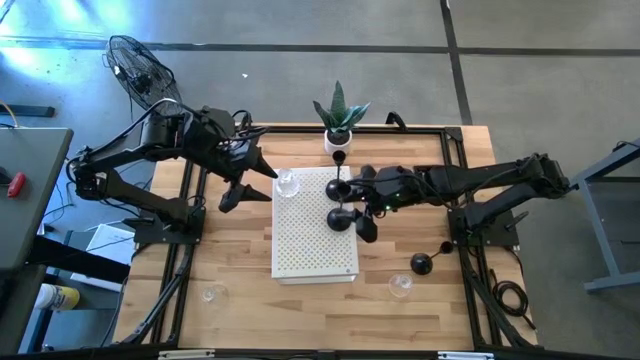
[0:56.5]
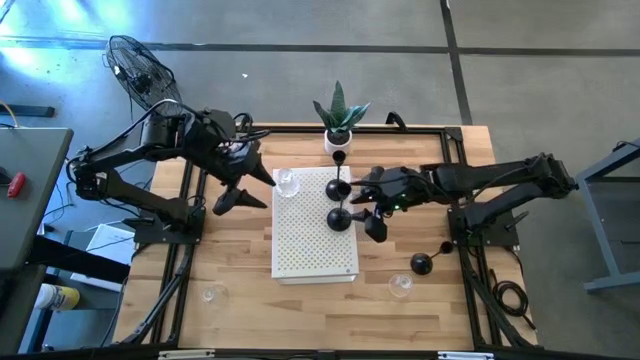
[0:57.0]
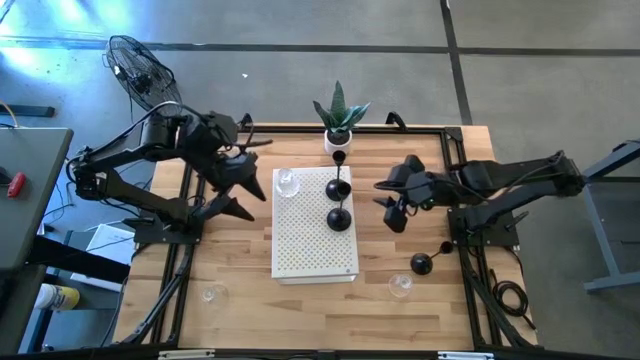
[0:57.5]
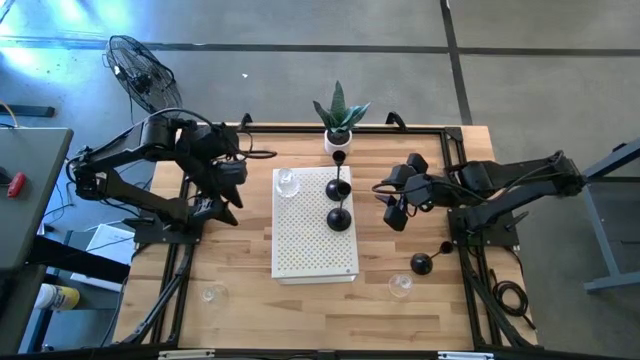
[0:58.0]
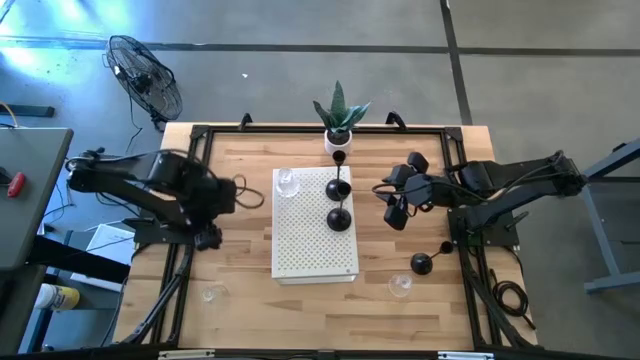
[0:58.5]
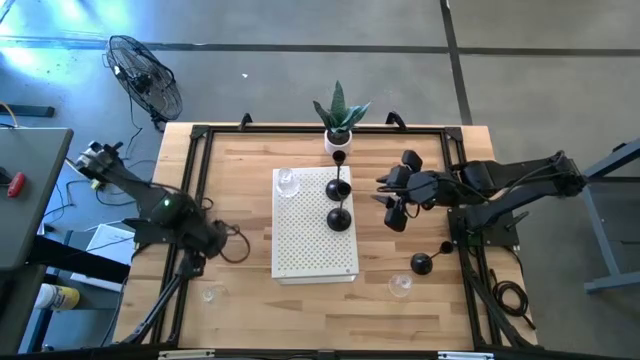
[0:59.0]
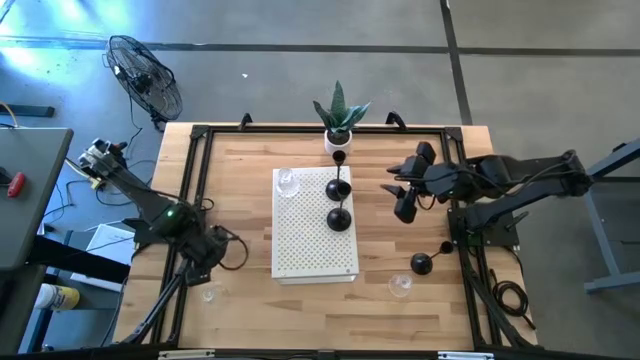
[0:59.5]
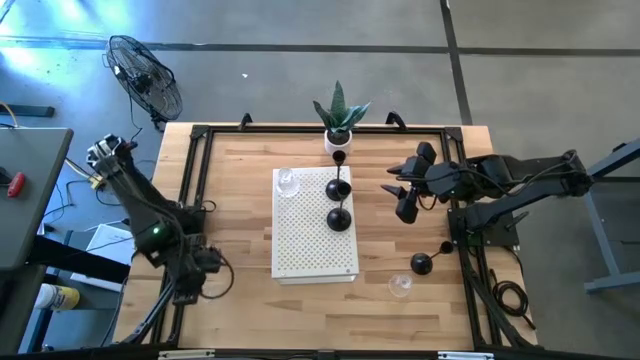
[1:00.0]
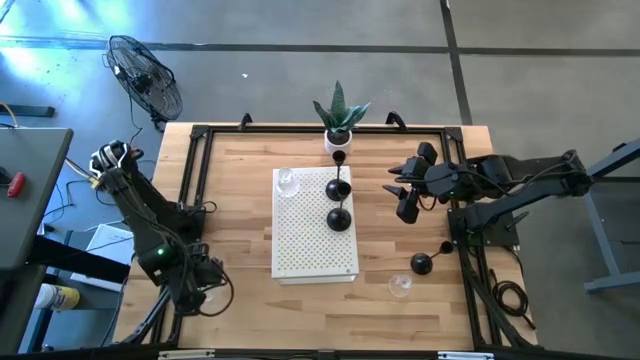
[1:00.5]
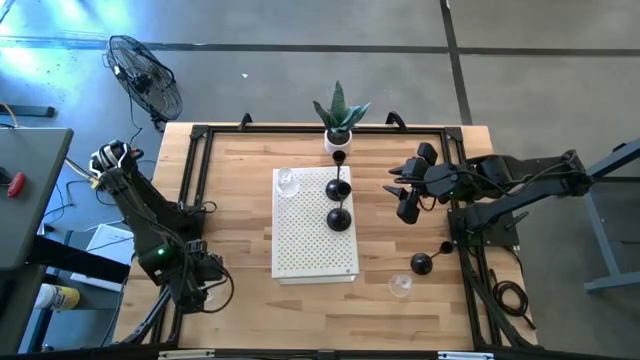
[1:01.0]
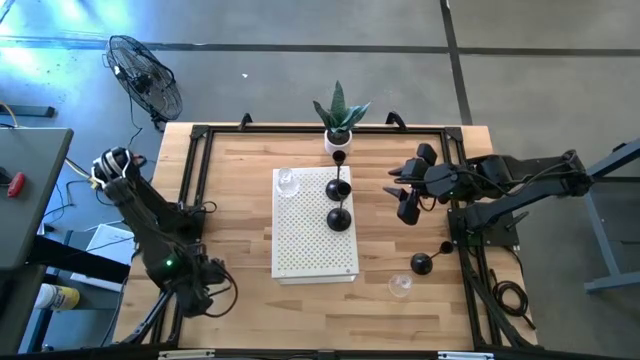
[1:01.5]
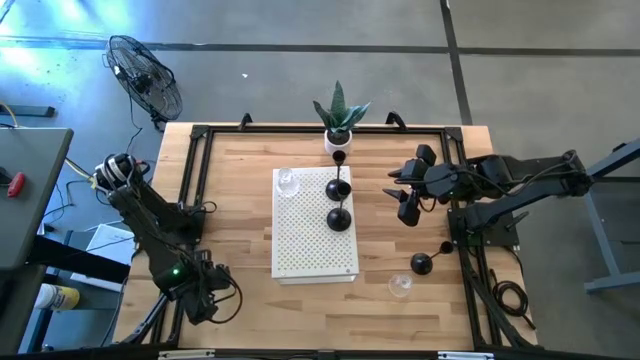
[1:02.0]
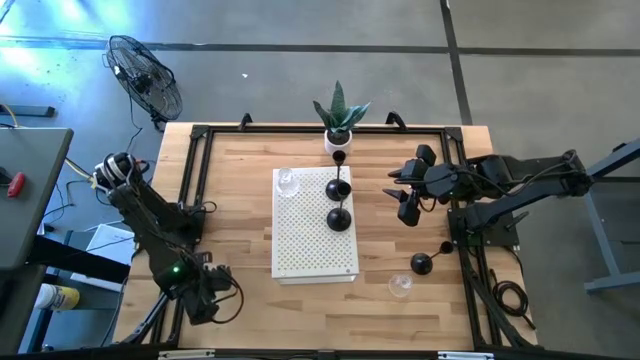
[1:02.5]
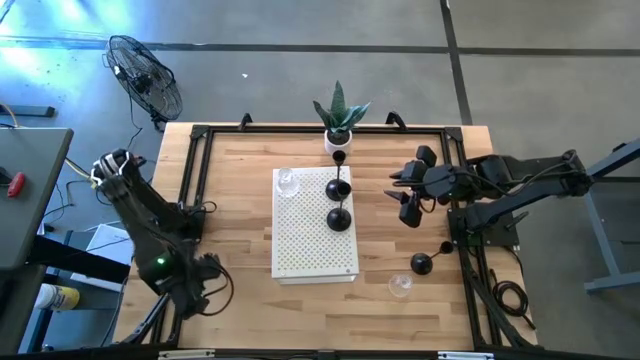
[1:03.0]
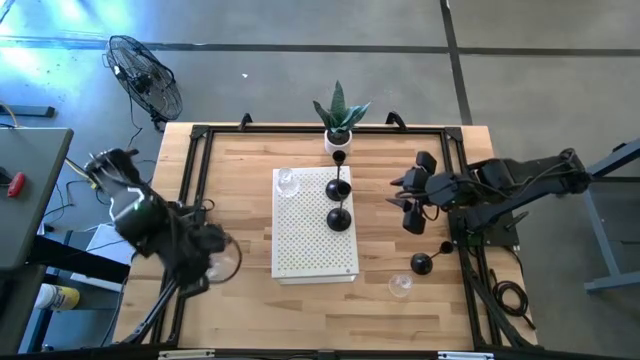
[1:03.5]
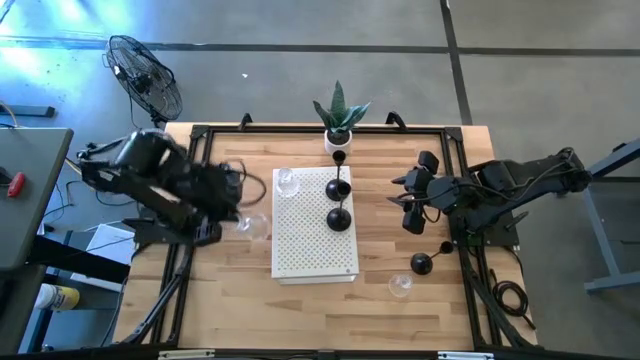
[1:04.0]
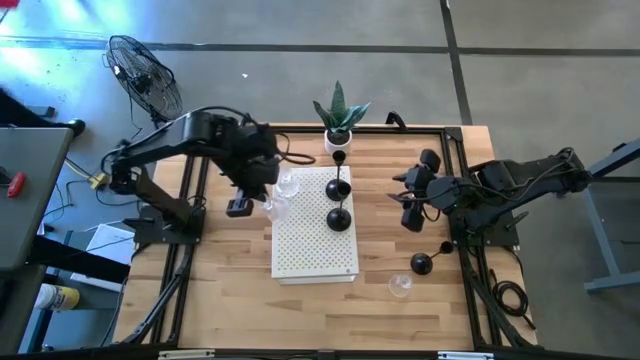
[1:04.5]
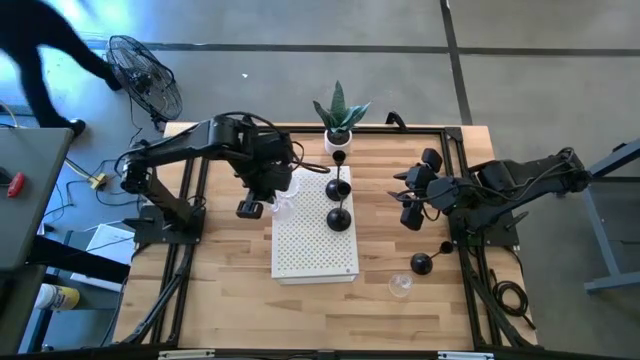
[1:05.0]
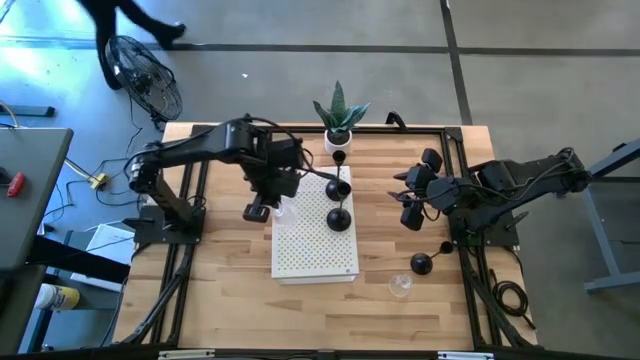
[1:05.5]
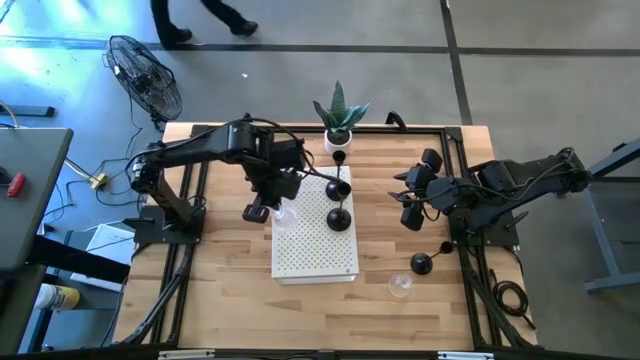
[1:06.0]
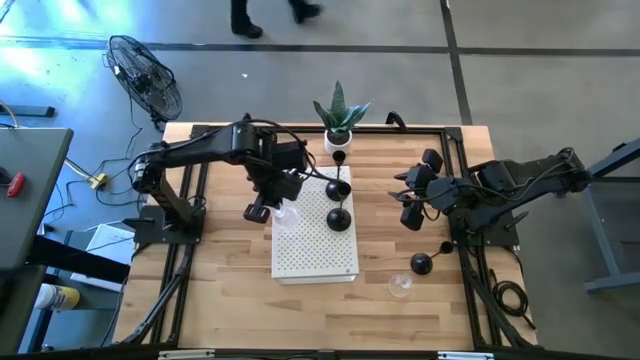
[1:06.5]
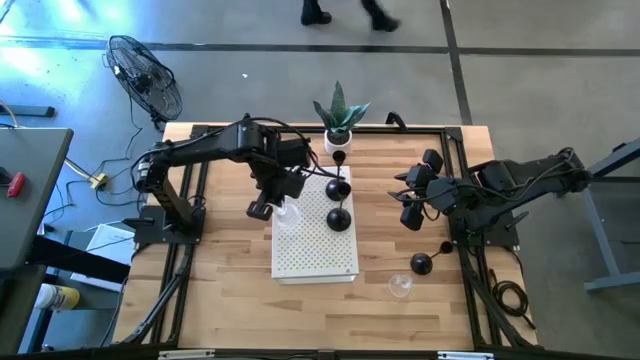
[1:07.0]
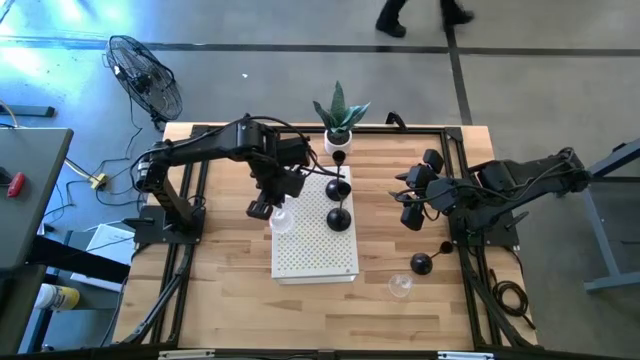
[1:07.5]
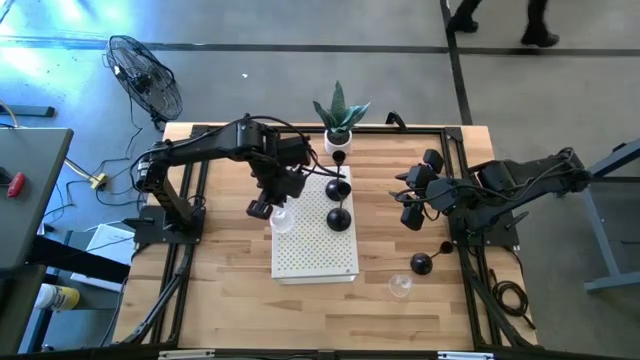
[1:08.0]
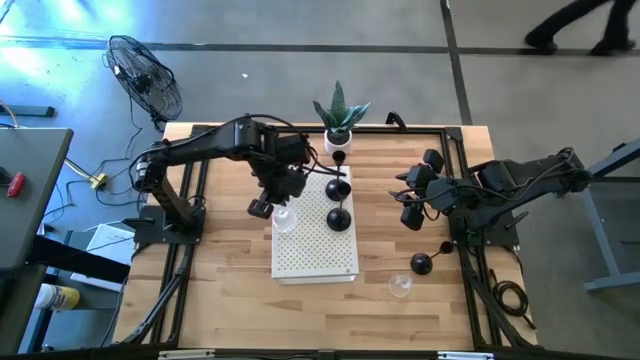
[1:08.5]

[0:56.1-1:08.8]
Task: Pick & Place candle stick holders
Put the left transparent glass candle holder on the shelf aligned with the other transparent glass candle holder

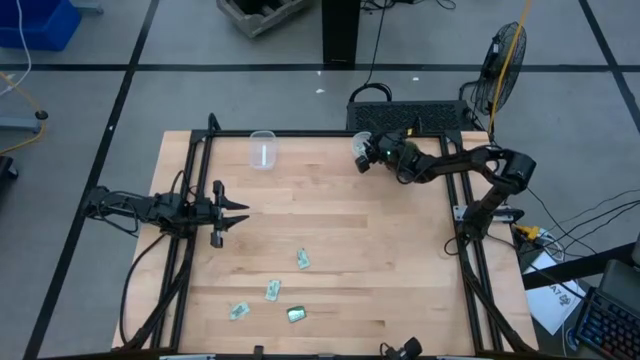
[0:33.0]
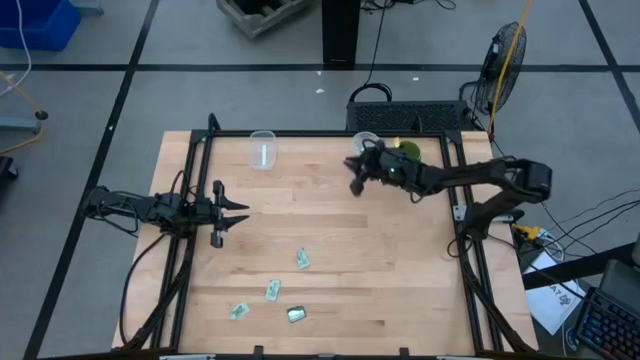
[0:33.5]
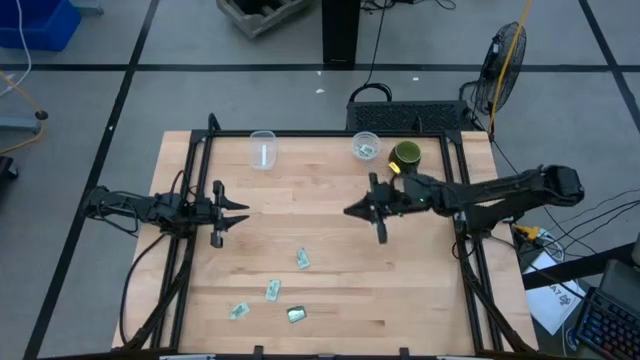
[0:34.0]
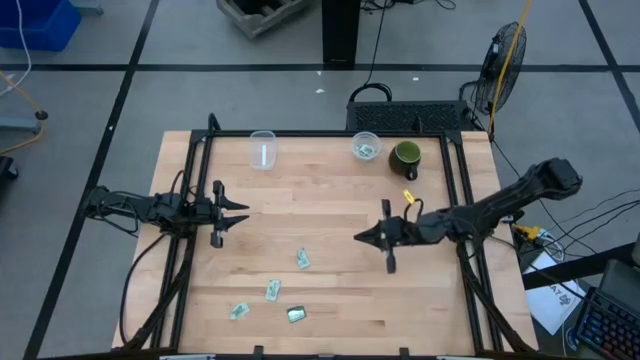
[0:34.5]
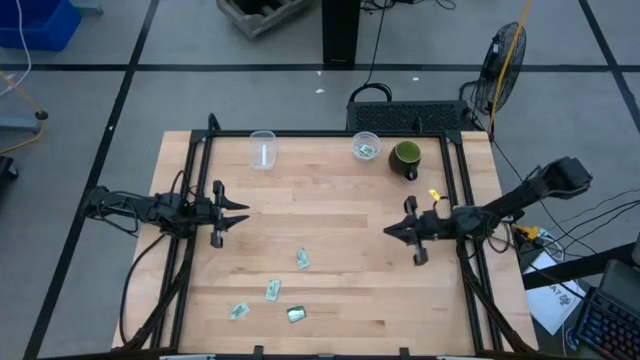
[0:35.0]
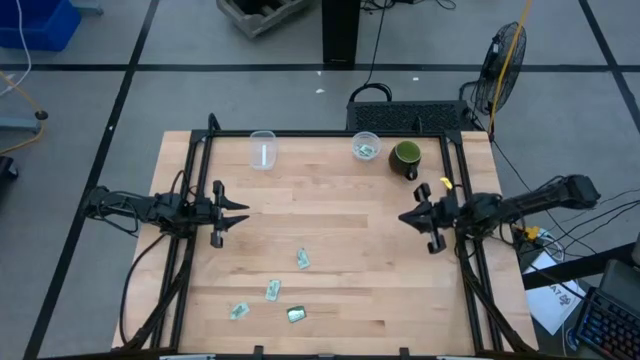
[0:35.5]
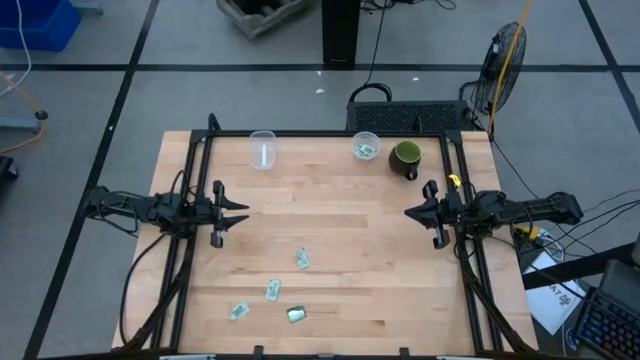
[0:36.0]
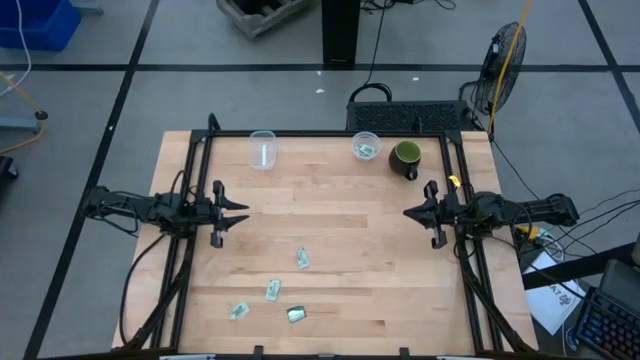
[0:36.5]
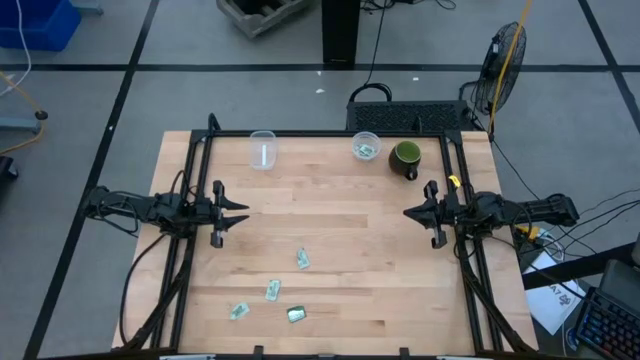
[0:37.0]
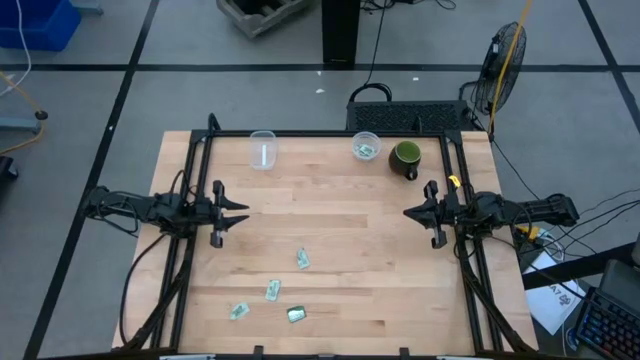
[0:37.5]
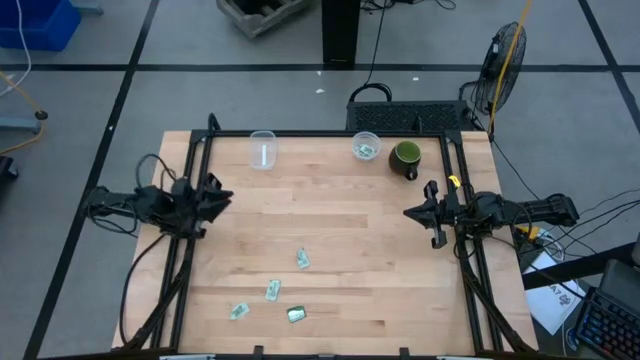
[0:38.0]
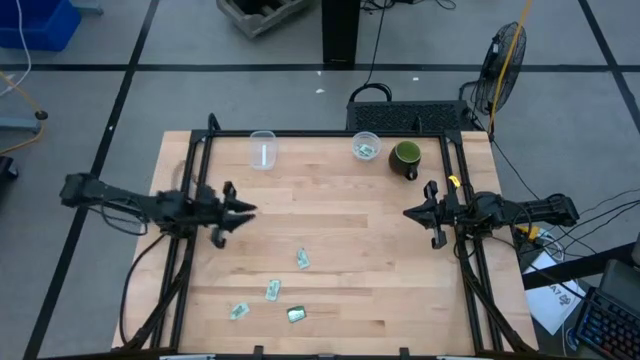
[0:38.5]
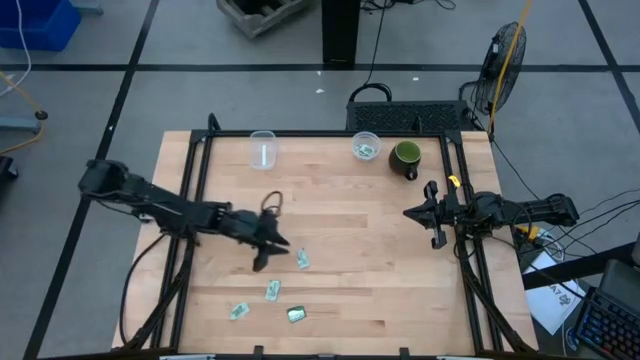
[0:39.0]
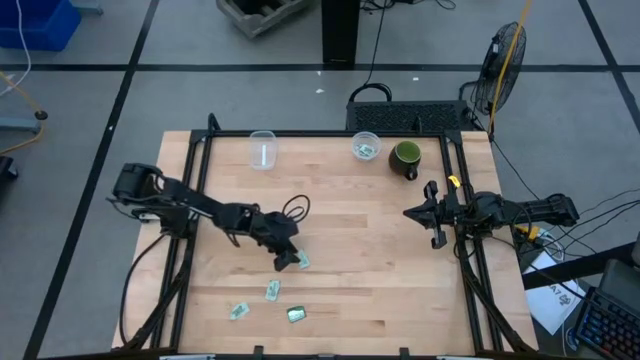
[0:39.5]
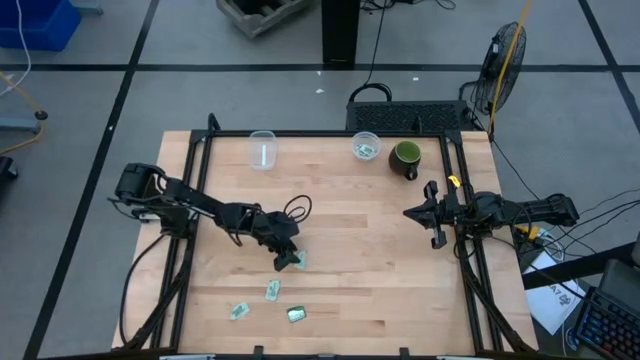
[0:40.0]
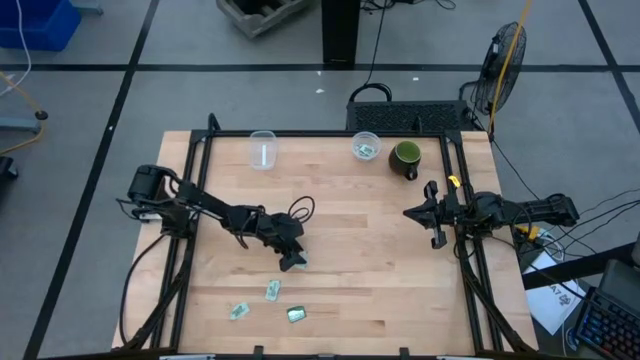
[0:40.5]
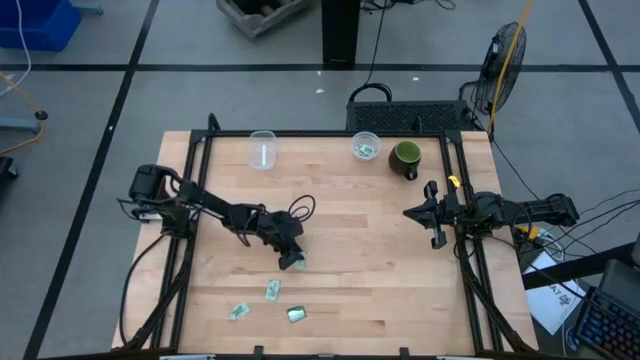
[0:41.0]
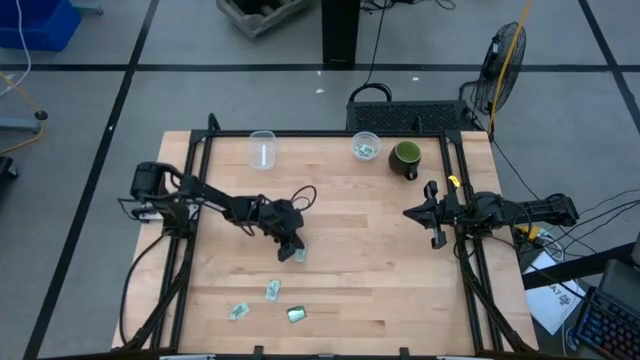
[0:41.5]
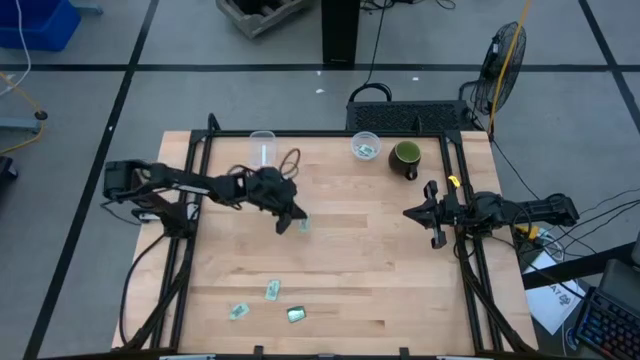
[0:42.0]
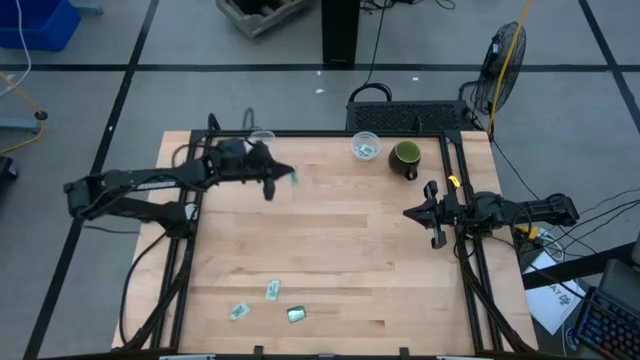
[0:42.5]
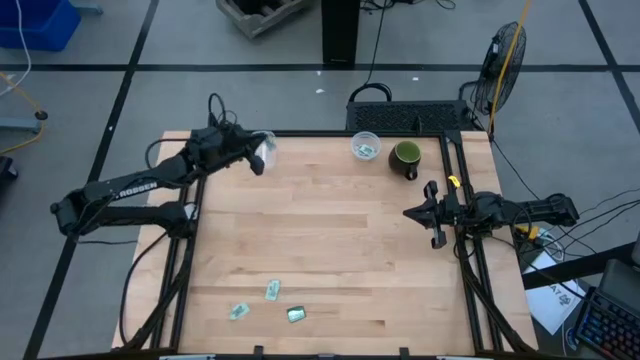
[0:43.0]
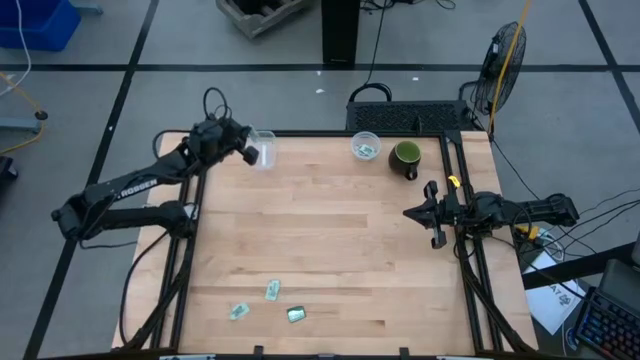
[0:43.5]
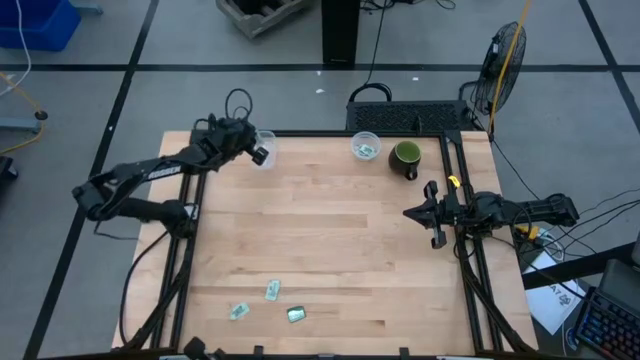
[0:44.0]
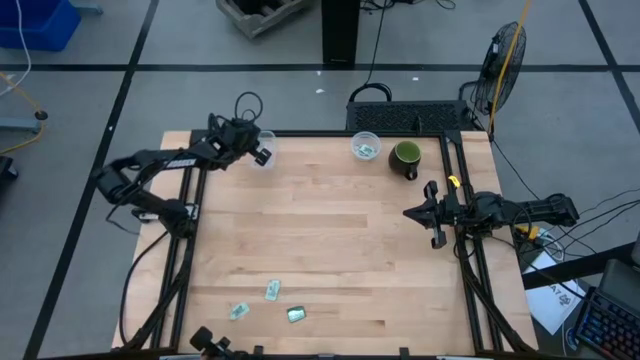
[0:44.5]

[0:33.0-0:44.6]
Task: Pick and place items into bin
Put the green stevia packet into the left transparent bin
